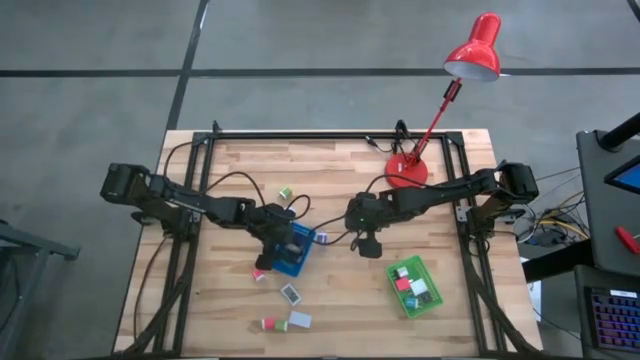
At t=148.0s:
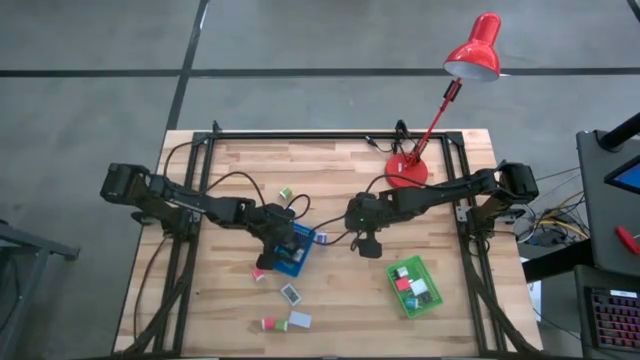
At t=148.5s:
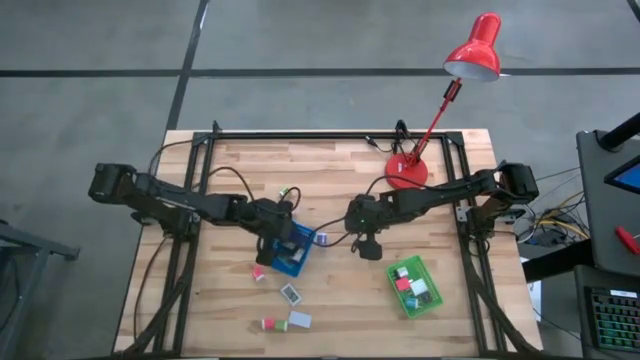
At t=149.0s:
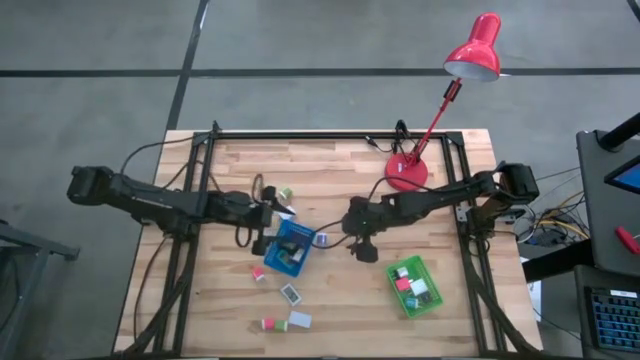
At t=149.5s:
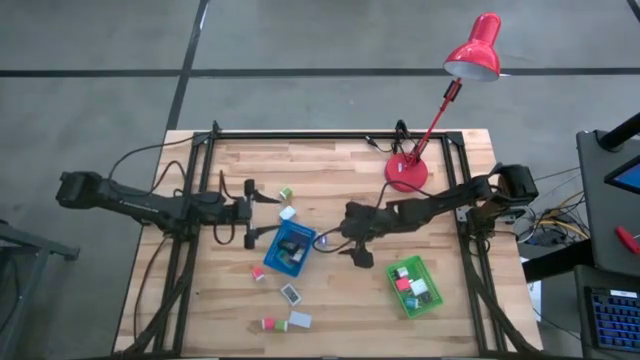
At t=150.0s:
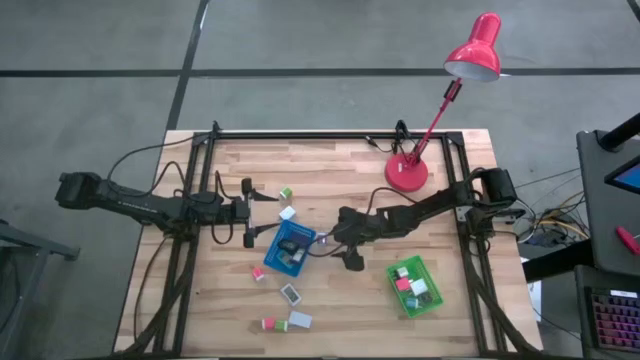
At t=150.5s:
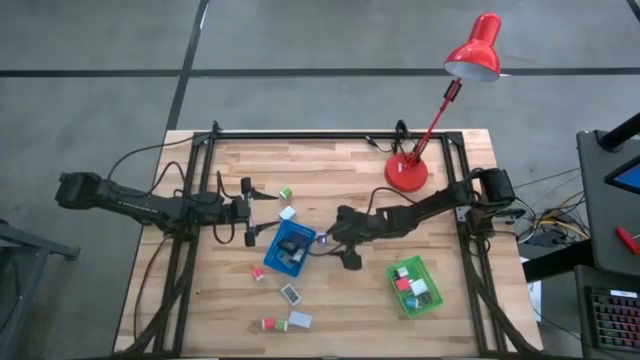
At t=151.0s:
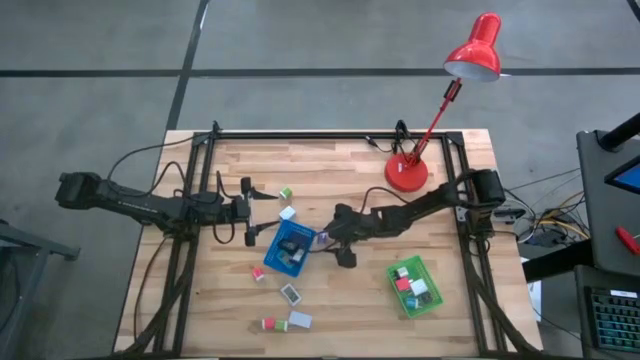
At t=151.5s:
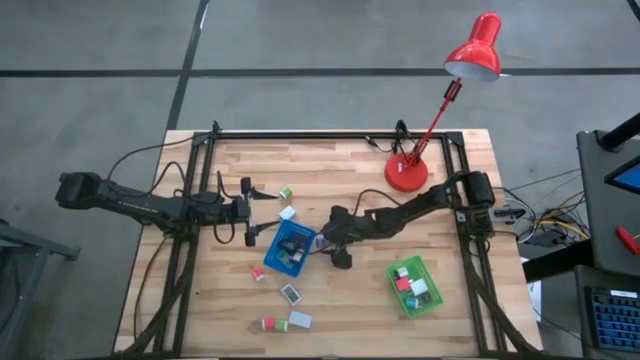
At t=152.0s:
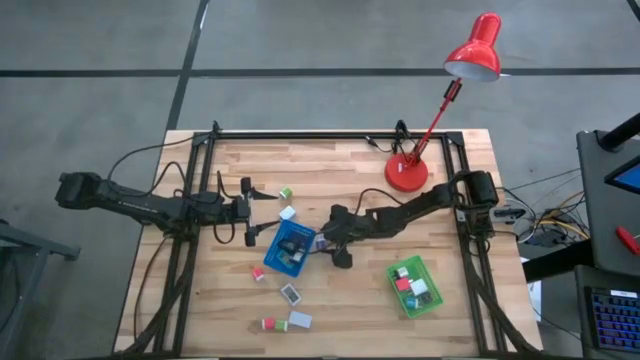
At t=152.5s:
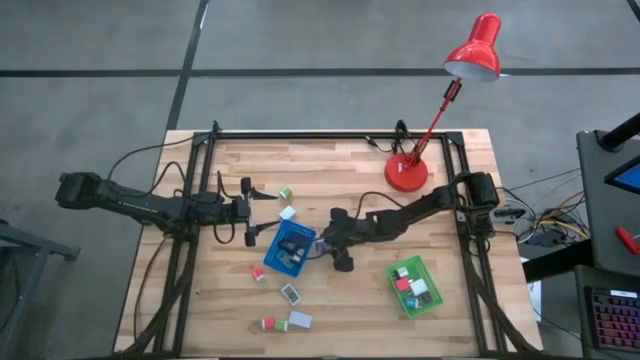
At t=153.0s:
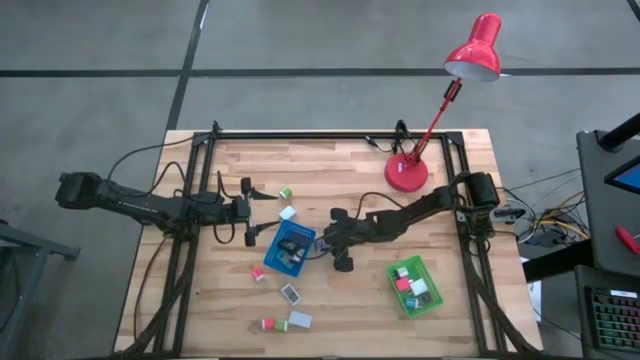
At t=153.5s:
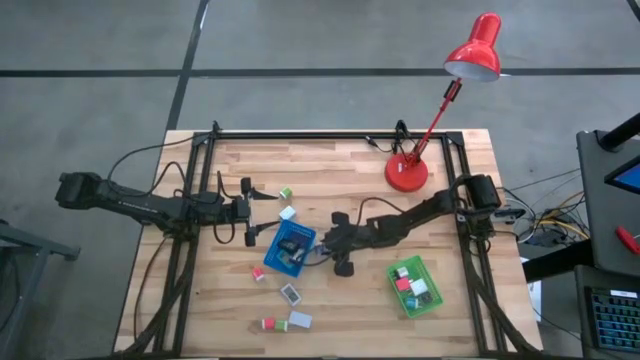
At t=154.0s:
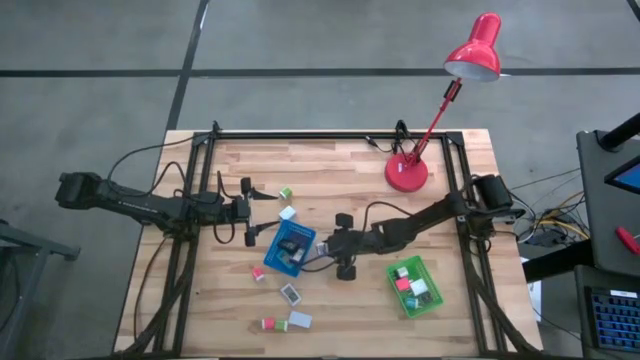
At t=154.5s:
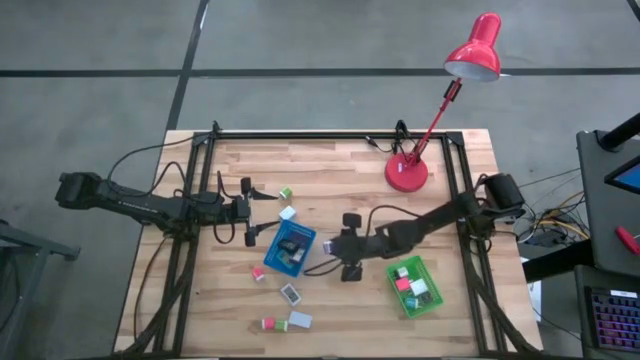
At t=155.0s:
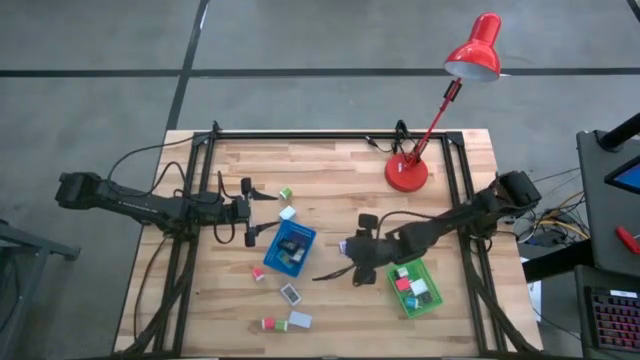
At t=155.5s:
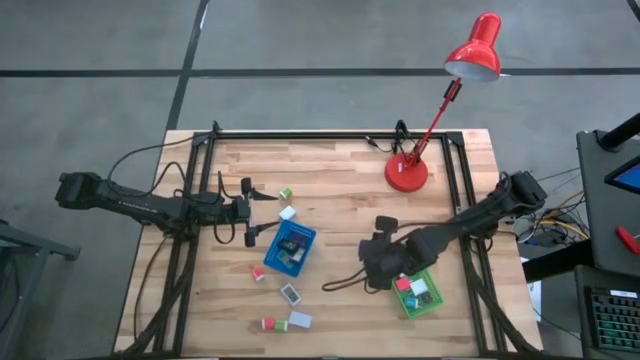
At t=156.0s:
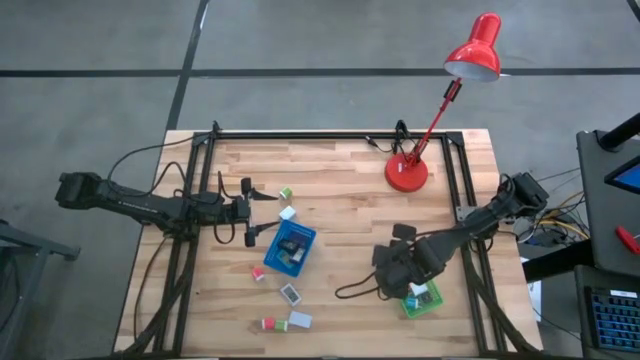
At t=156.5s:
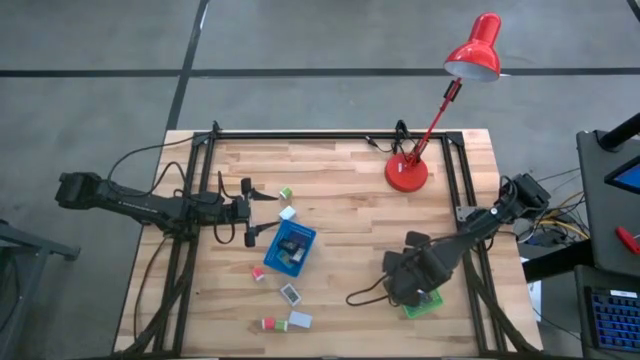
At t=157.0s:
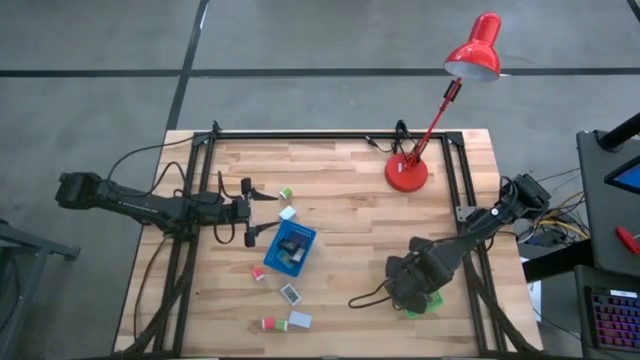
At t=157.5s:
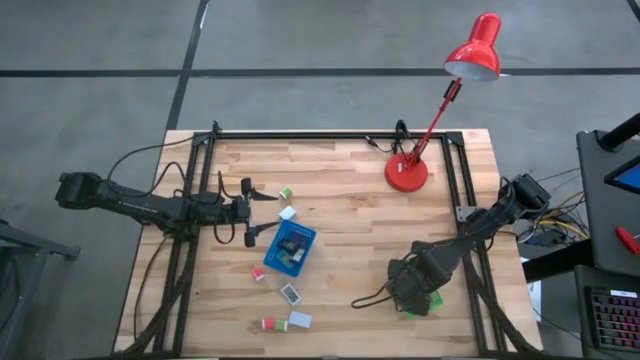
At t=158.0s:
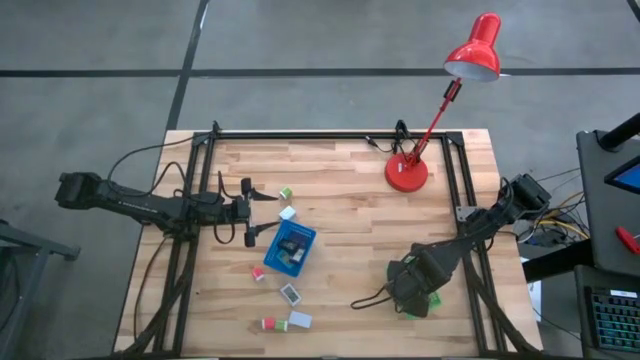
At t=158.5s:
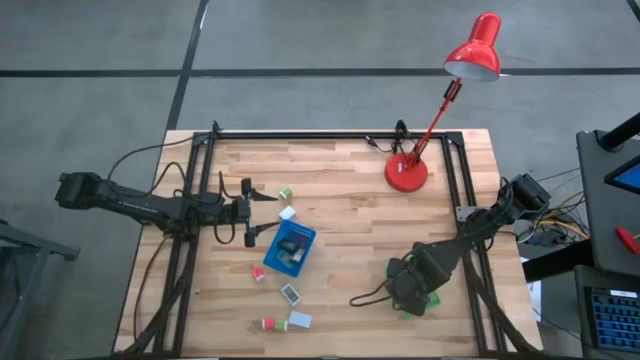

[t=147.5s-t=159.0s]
Task: Pick & Place Office items
Put the violet charger adapter into the green bin

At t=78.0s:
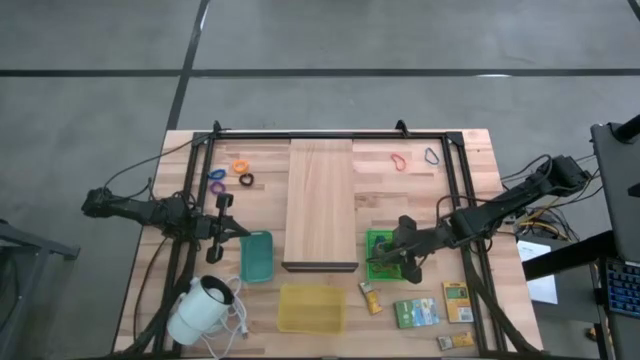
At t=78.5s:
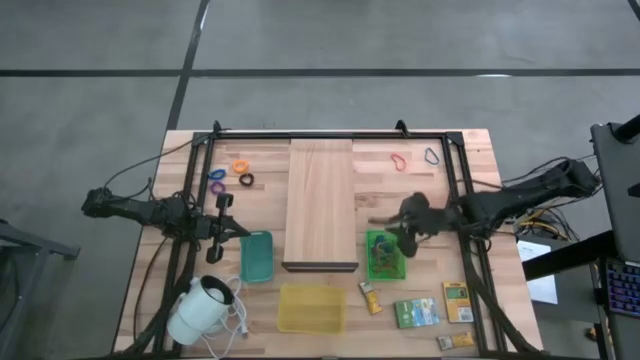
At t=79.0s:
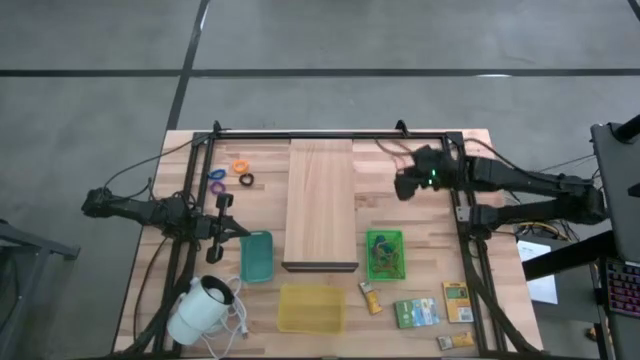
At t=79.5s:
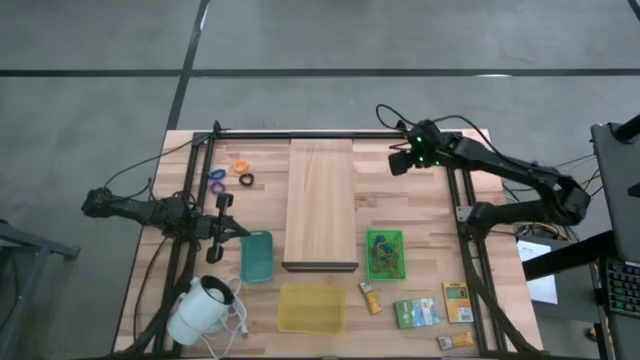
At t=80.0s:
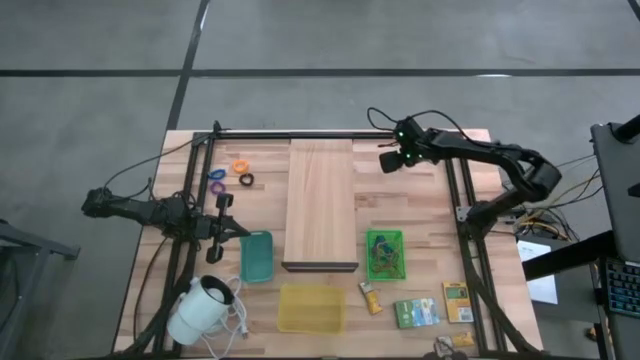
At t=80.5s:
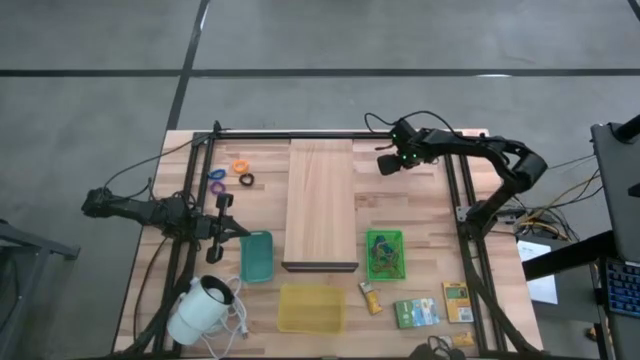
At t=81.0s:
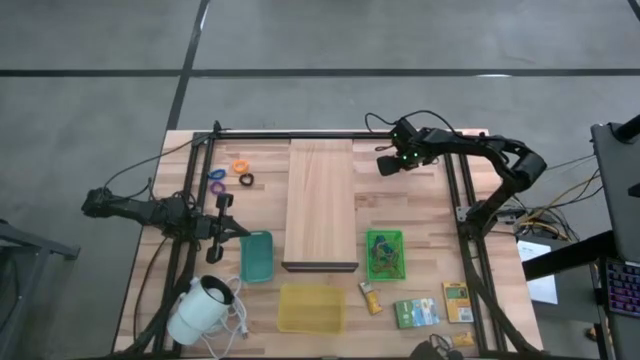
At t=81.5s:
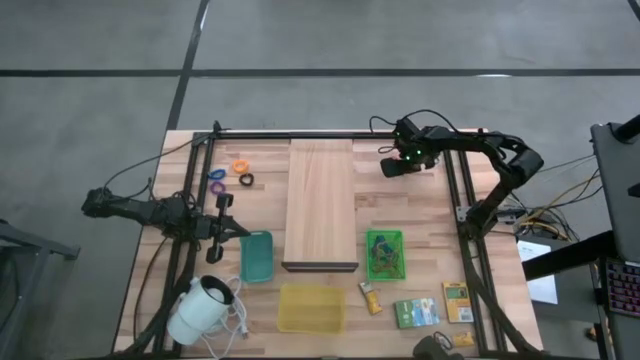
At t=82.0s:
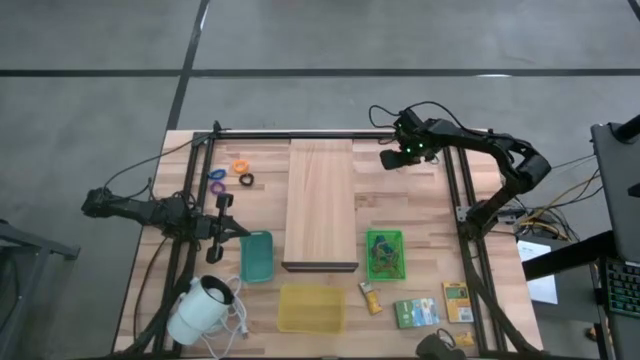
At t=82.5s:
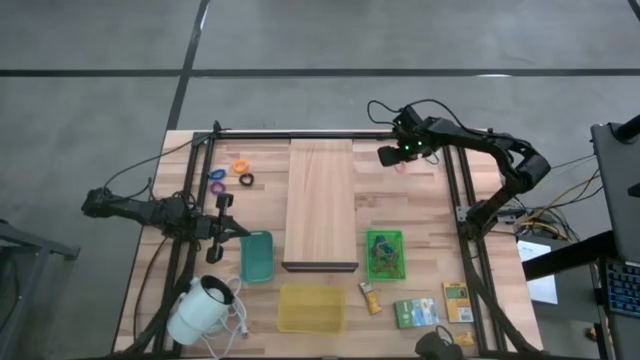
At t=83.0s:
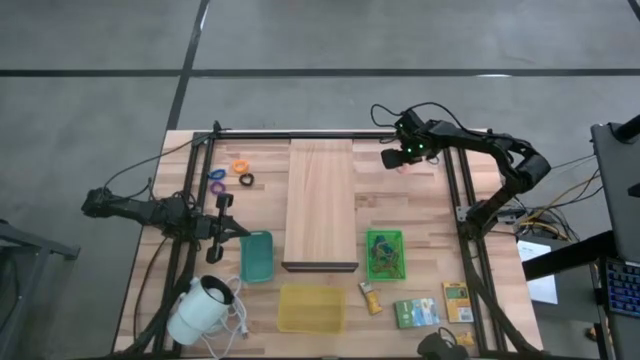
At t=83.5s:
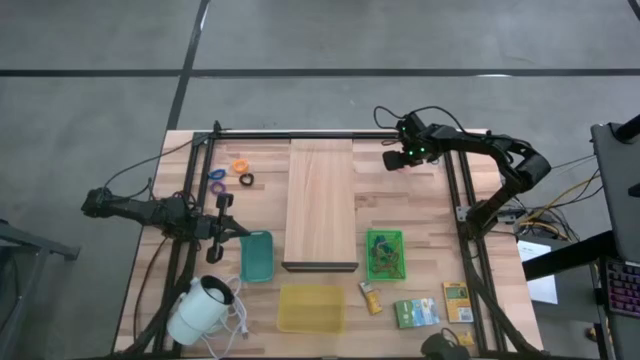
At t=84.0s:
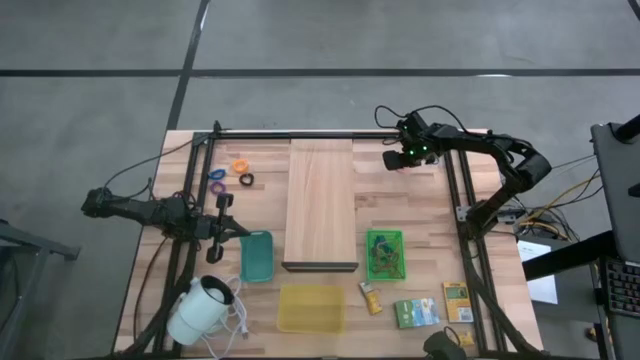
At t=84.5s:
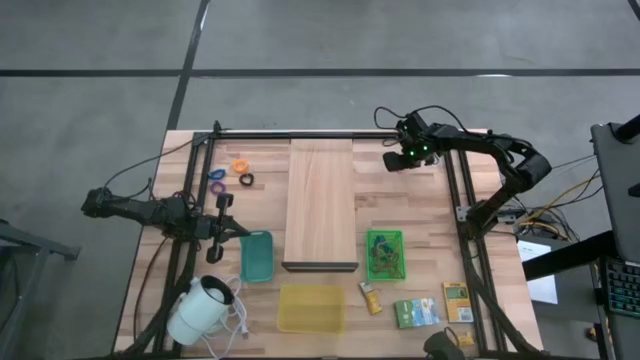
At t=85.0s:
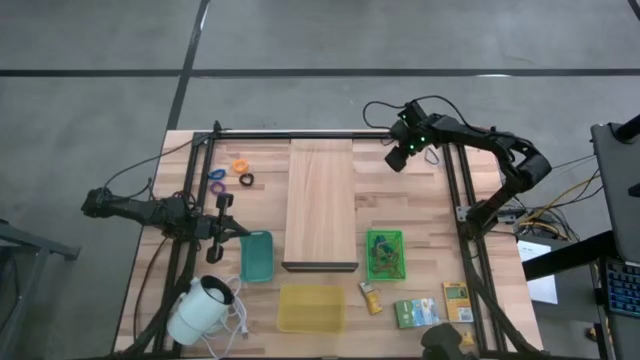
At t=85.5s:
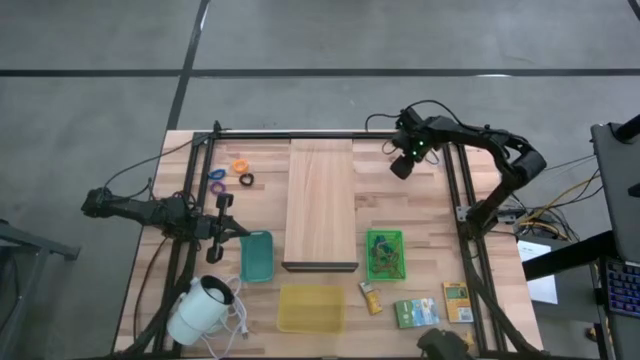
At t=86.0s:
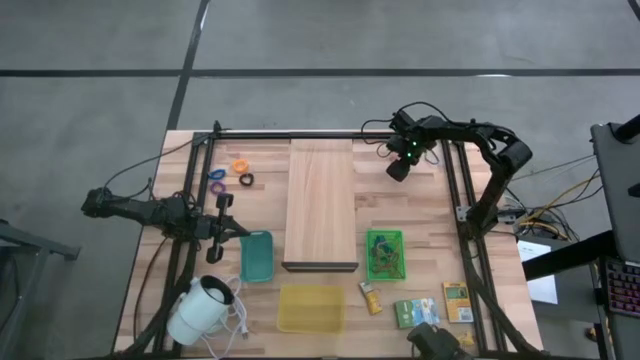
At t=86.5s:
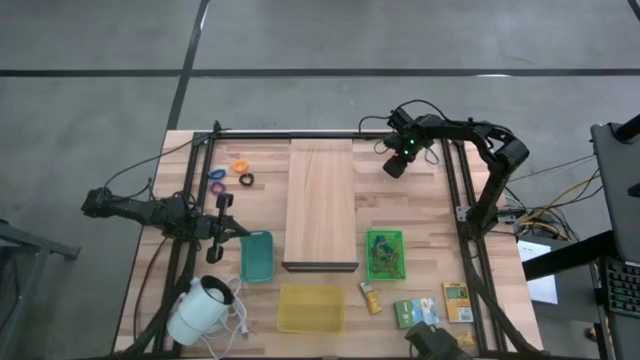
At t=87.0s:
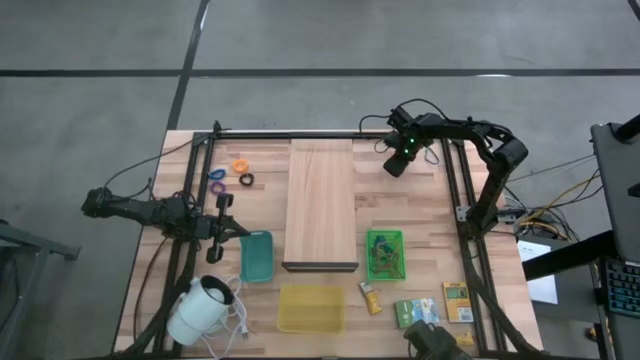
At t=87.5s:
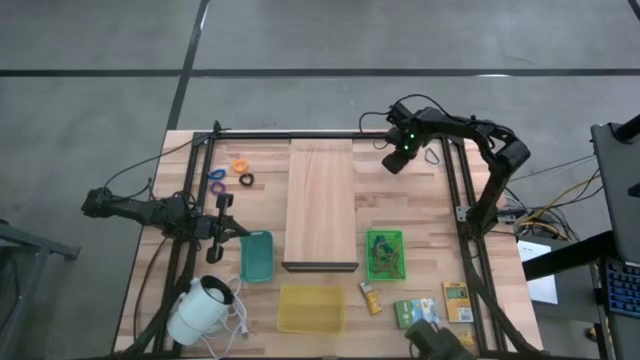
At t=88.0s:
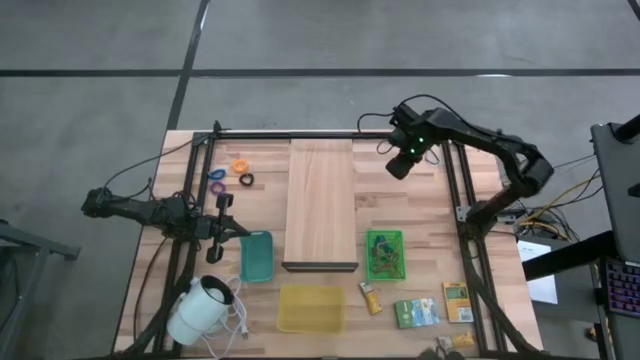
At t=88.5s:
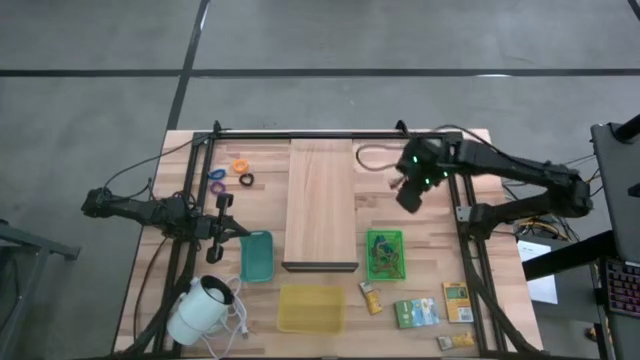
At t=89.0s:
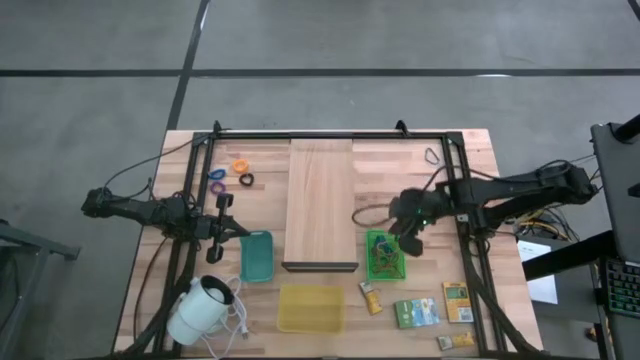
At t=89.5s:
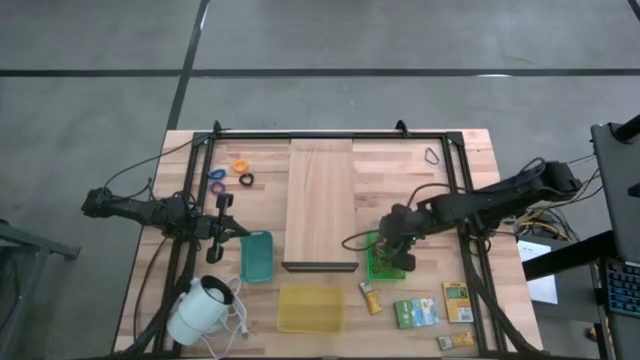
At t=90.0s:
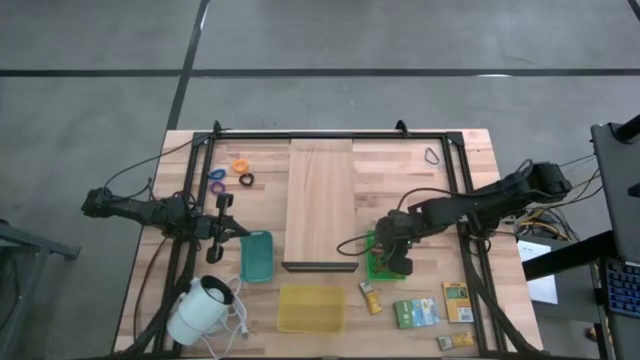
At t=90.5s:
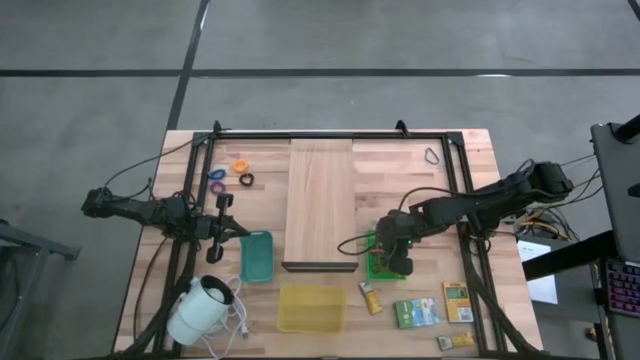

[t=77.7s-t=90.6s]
Task: Pick & Place Office Desk Supplies
Put the orange rubber band into the green bin
